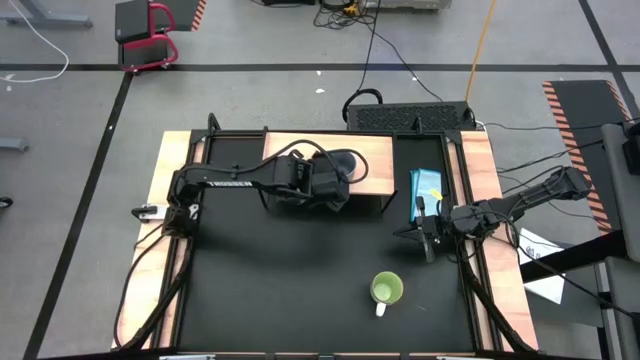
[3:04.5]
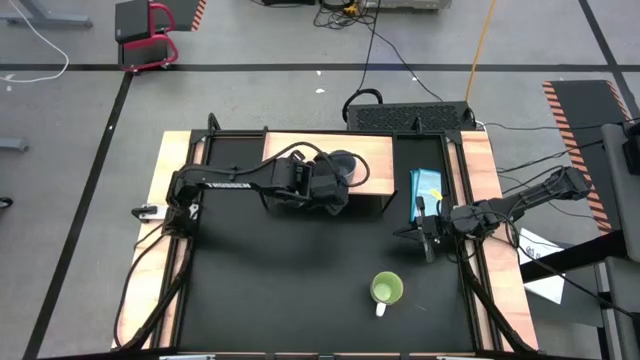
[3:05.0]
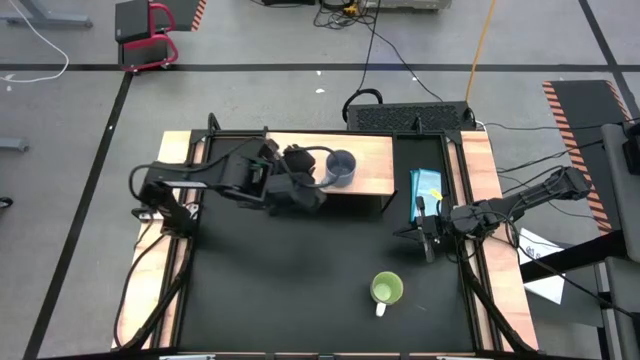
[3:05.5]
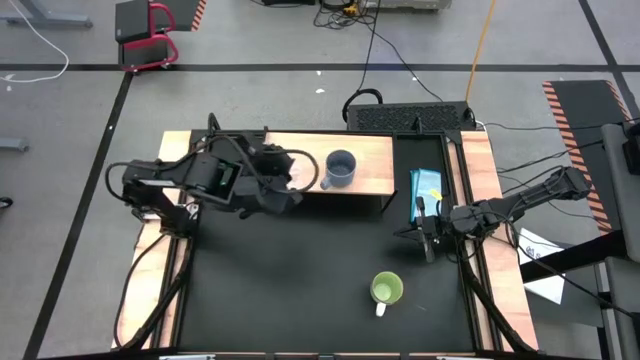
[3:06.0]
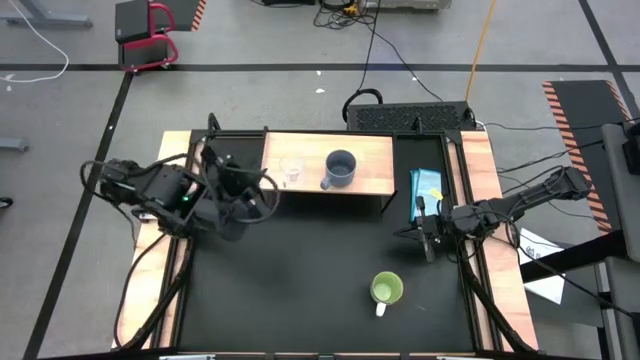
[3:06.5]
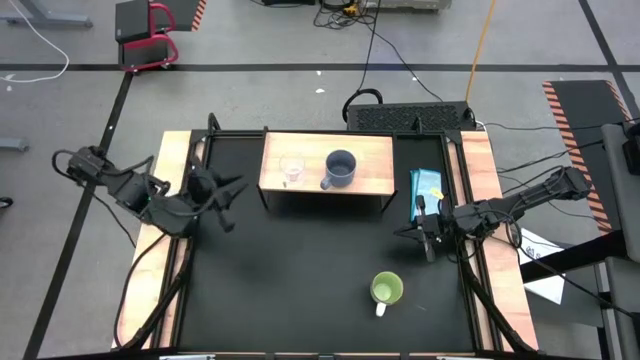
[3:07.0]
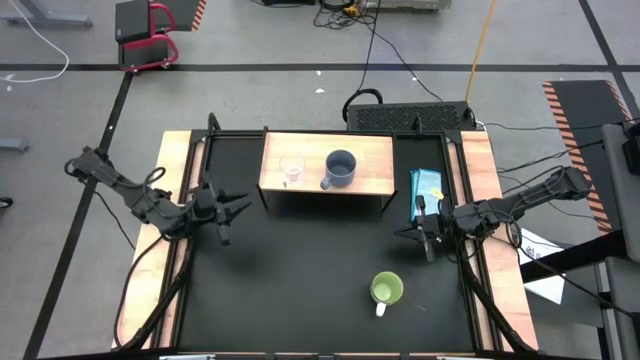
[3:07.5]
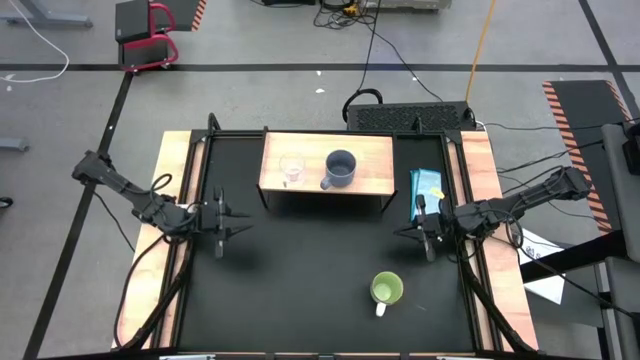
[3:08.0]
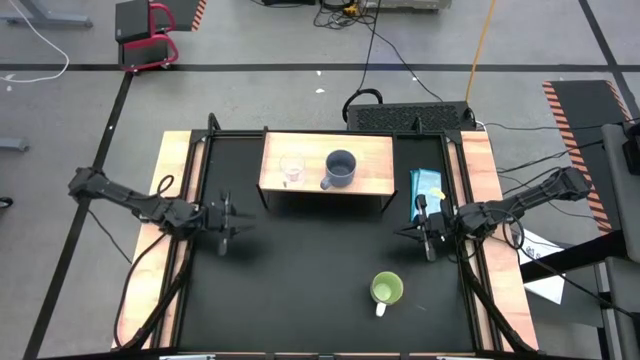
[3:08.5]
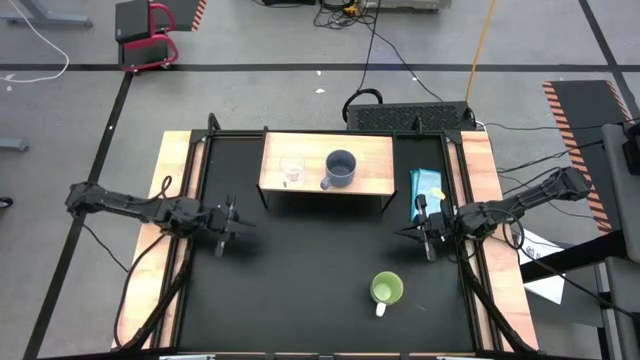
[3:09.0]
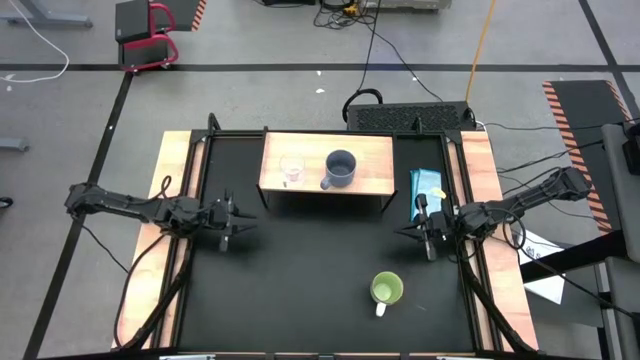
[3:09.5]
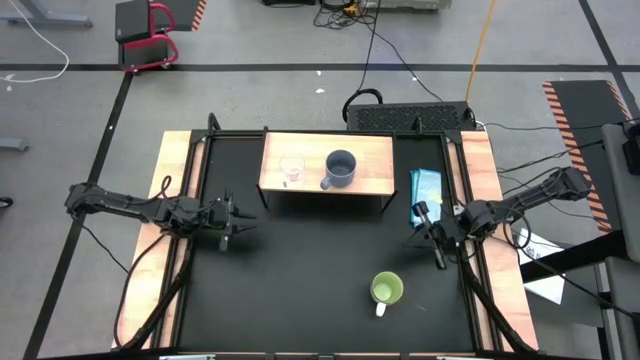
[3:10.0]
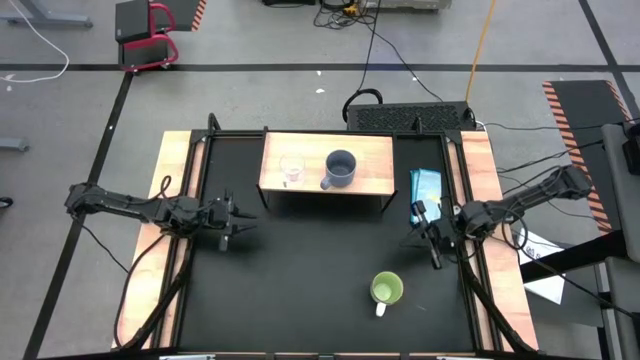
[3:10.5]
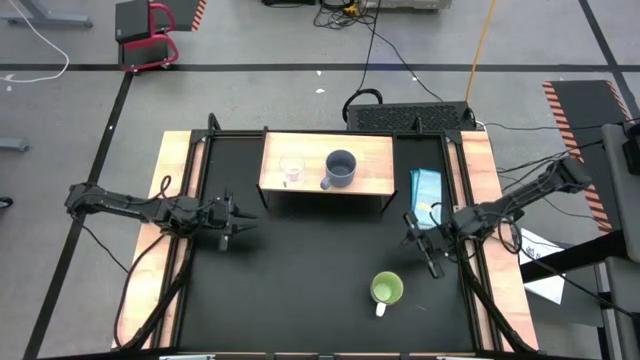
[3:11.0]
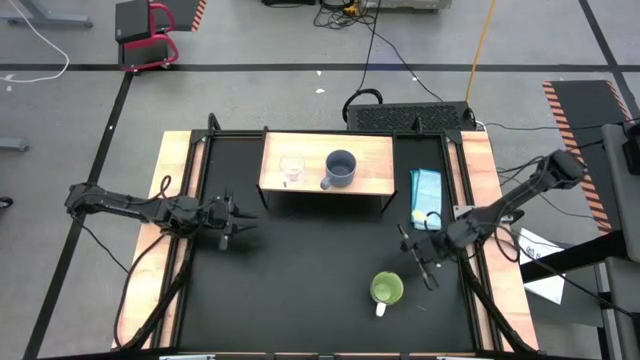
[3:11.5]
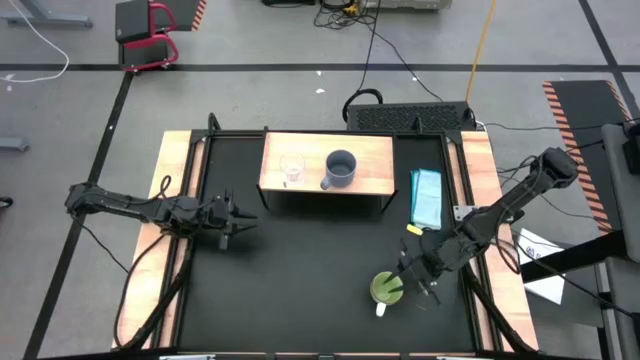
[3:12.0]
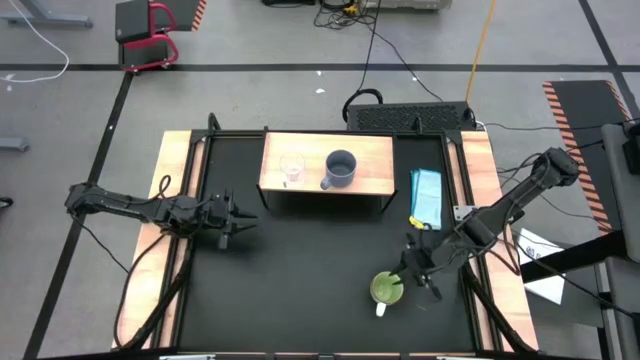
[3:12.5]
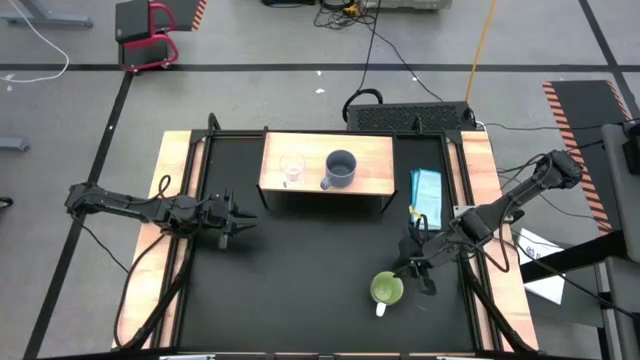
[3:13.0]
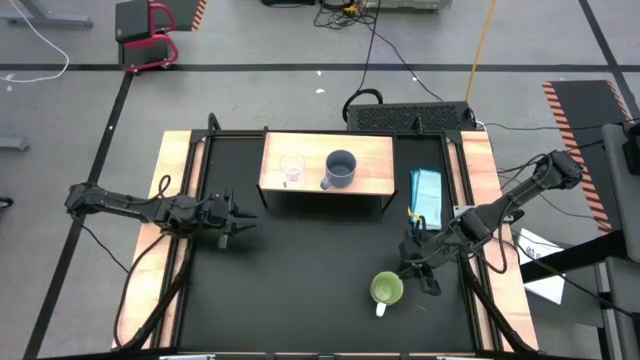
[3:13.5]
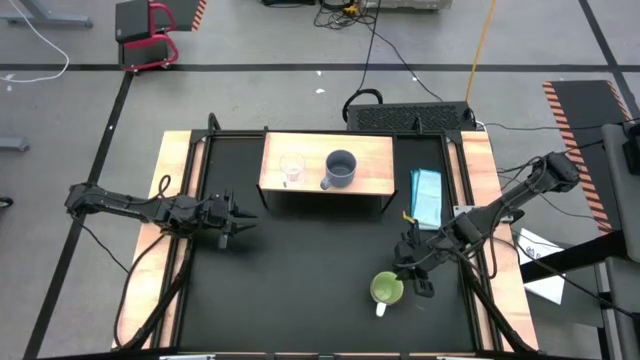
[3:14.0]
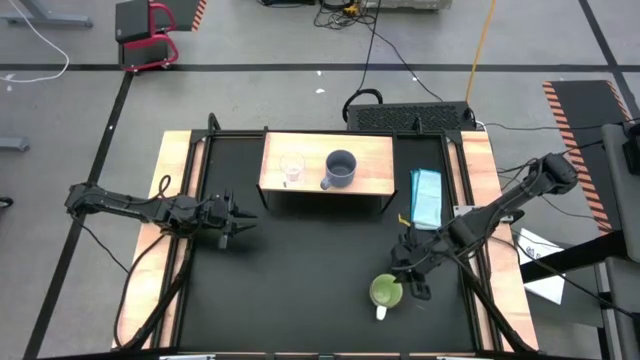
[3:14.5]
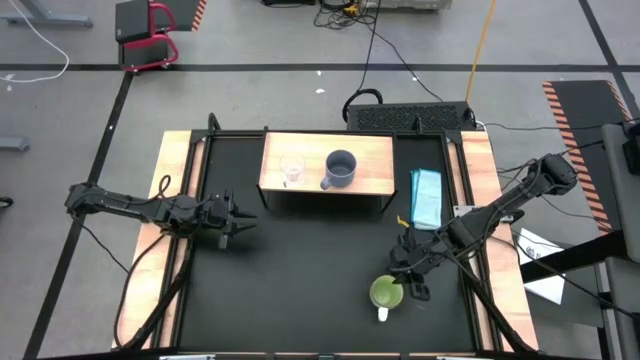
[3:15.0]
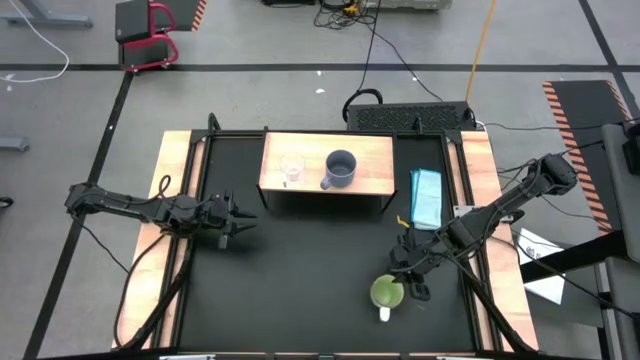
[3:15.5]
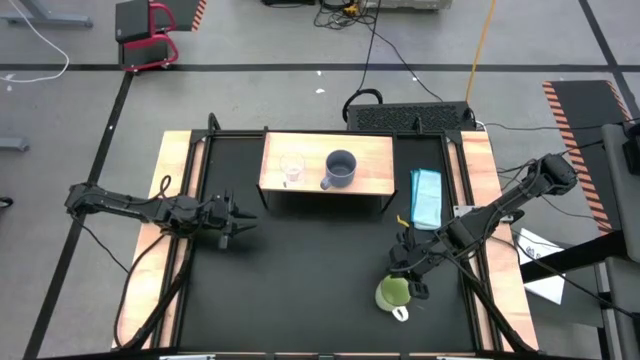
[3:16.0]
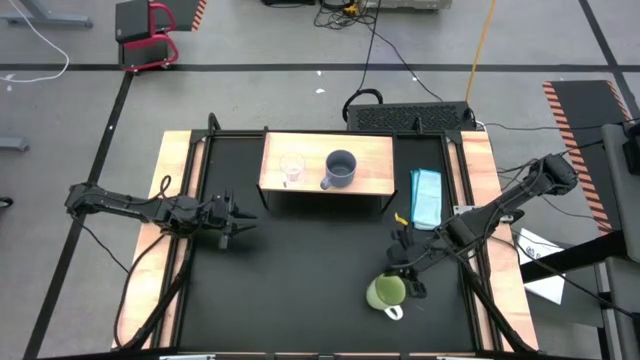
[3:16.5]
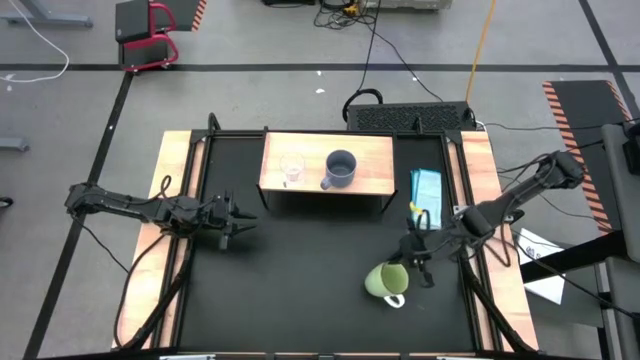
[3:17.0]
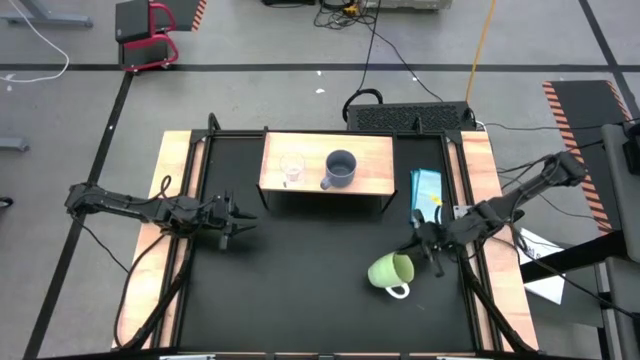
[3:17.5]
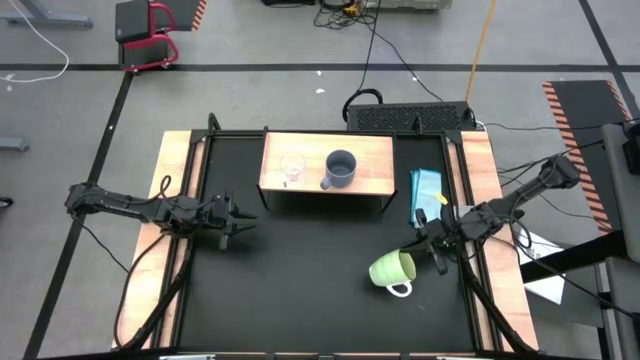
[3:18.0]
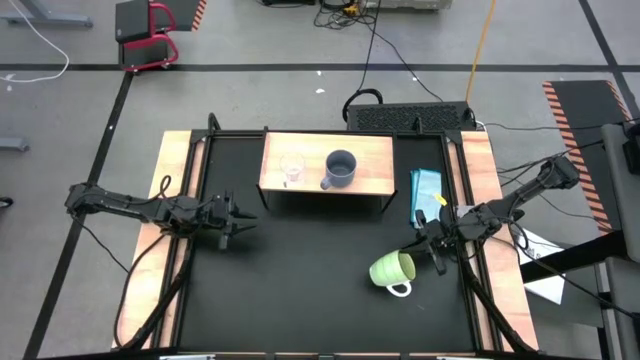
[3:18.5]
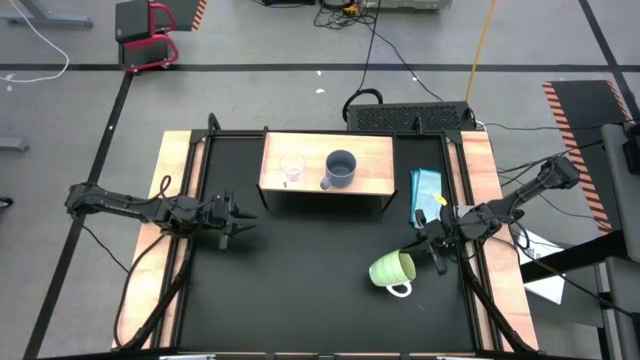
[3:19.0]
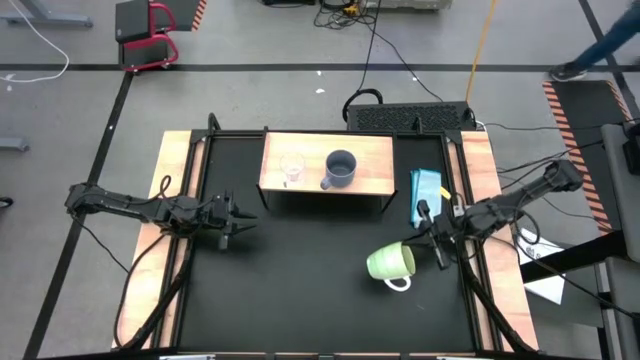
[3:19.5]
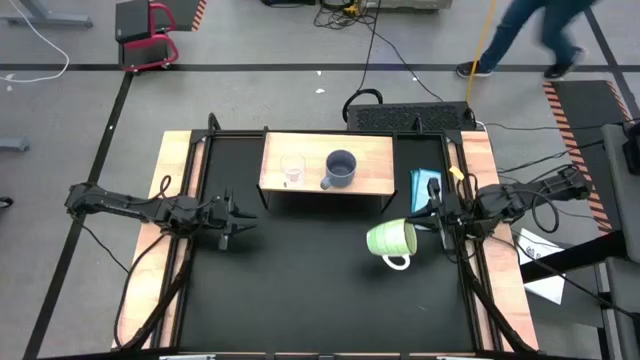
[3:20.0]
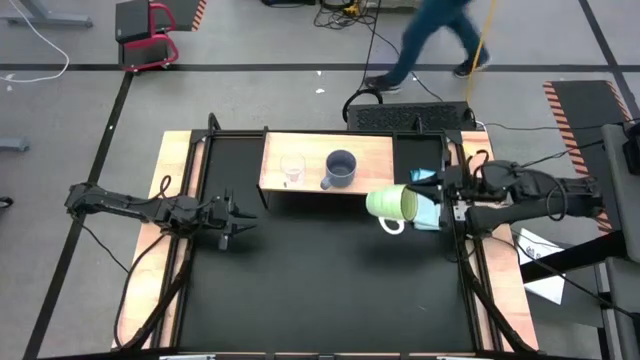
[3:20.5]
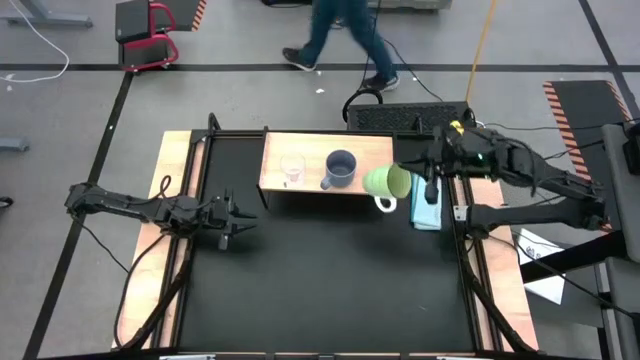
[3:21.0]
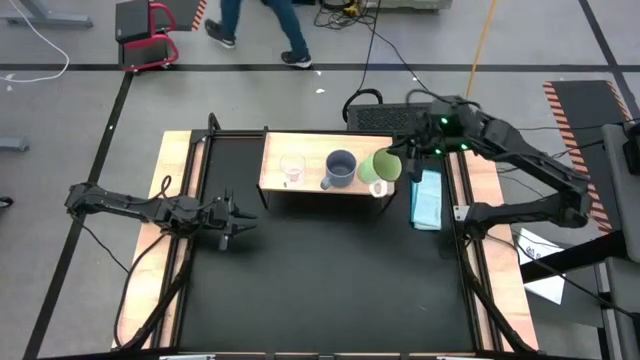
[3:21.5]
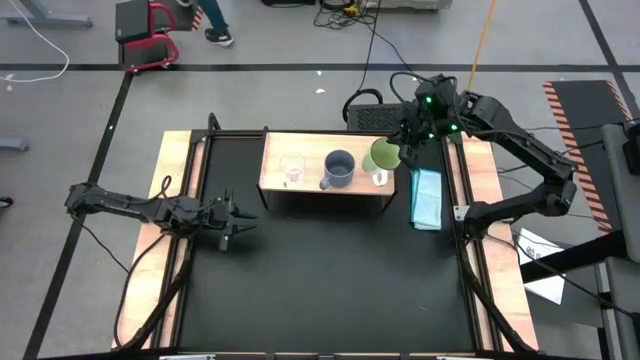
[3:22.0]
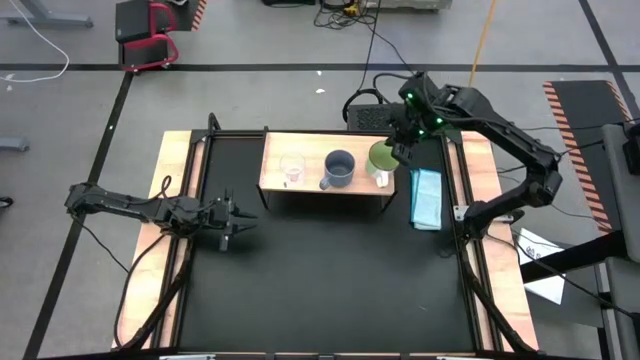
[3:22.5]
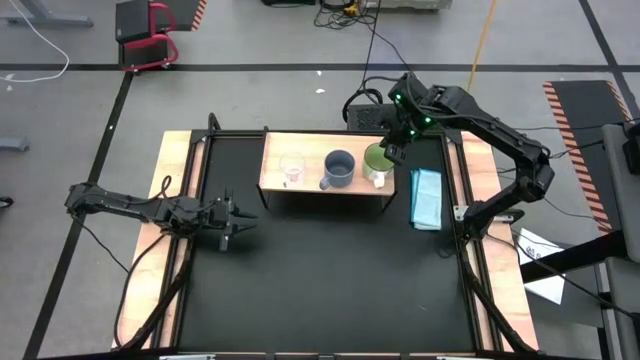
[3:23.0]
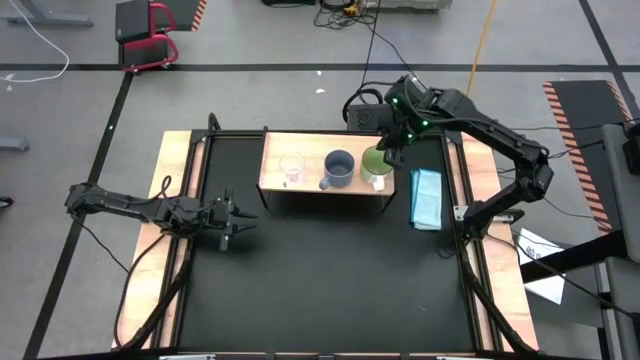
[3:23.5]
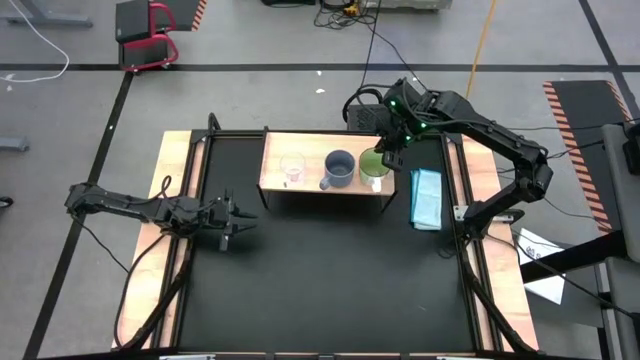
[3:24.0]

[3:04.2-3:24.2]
Task: Stack small to large cups/mugs on shelf
Put the green mug on the shelf

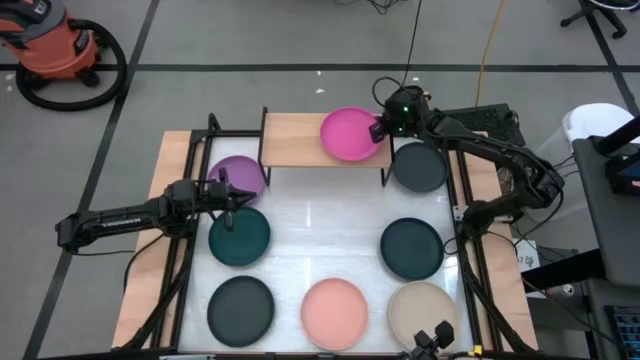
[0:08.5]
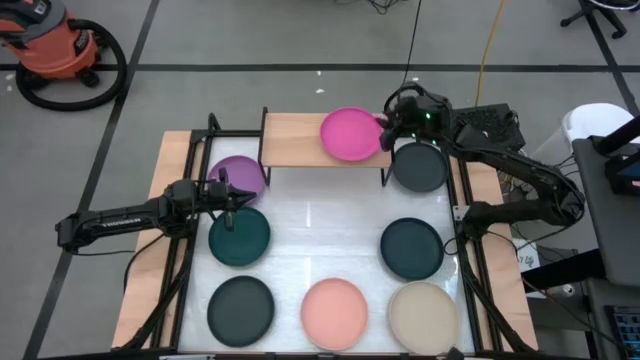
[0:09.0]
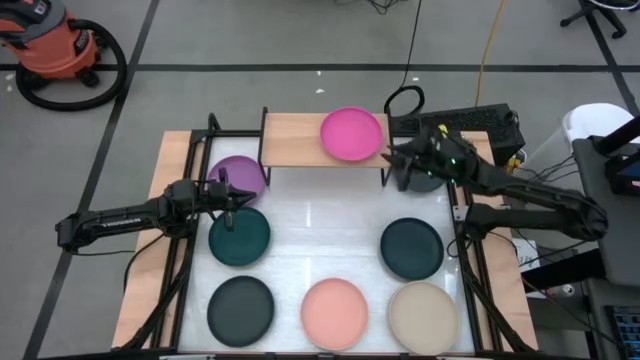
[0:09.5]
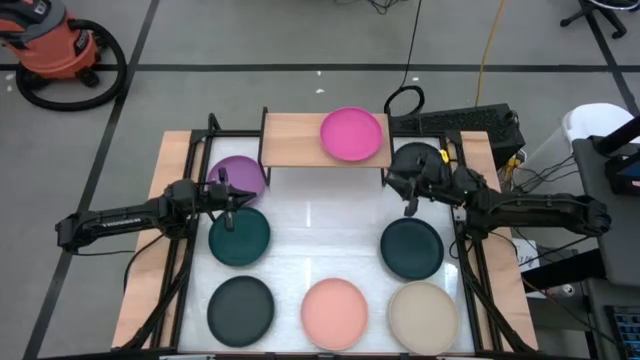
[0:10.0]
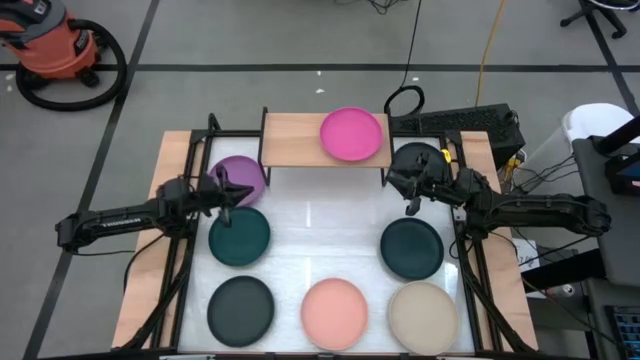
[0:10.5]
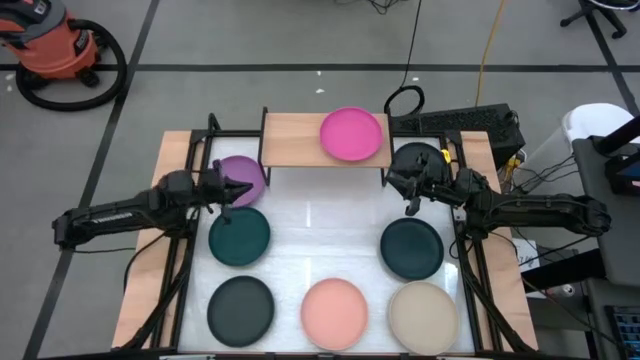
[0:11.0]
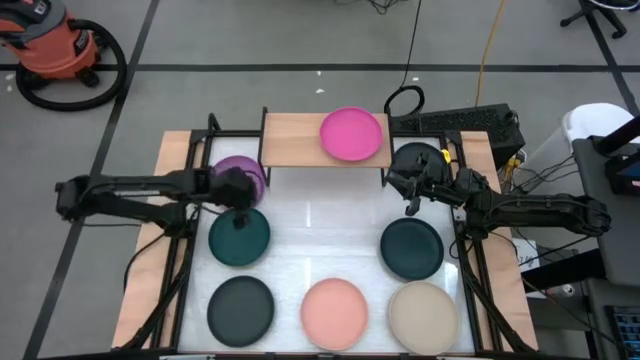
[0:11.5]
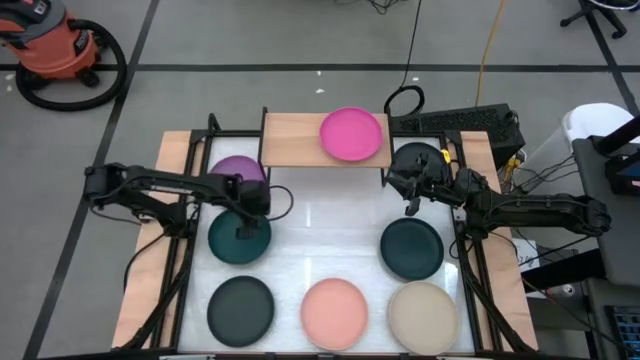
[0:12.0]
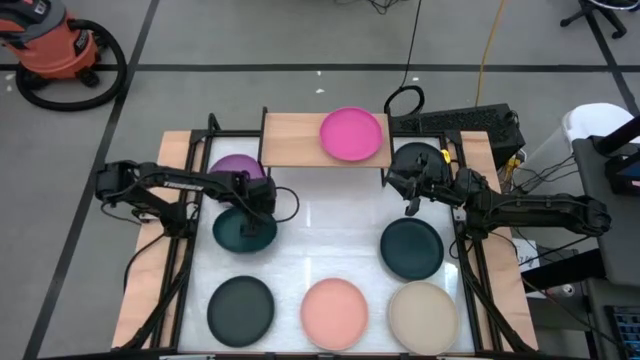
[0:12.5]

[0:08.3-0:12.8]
Task: Place and stack plates onto a shelf
Stack the left dark green plate on top of the pink plate on the shelf
